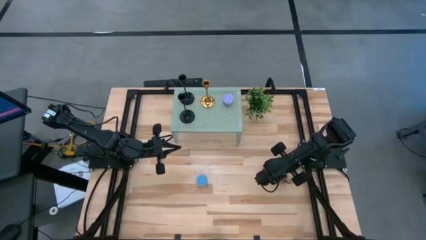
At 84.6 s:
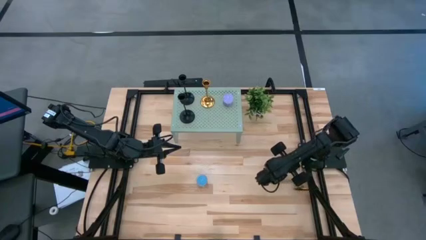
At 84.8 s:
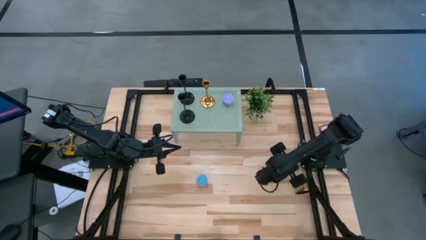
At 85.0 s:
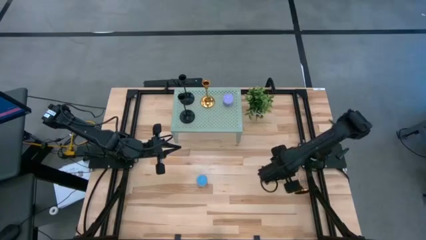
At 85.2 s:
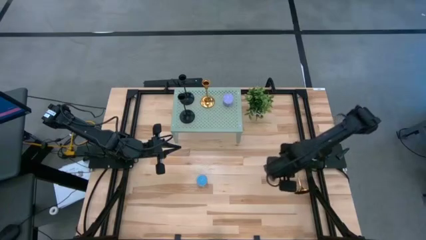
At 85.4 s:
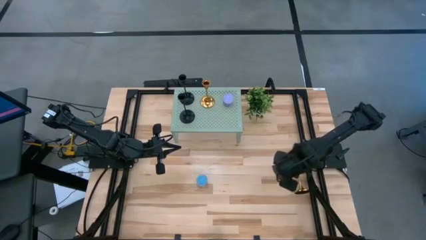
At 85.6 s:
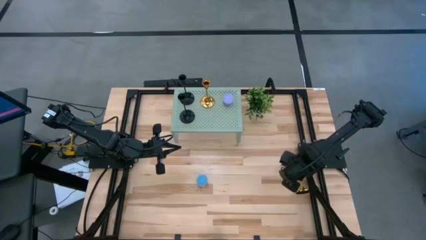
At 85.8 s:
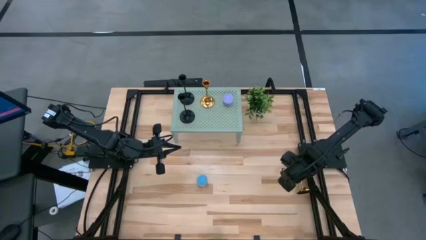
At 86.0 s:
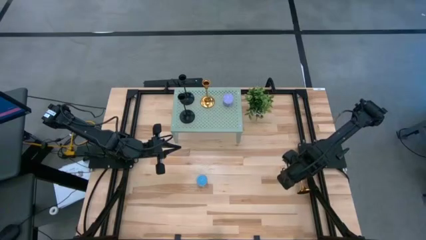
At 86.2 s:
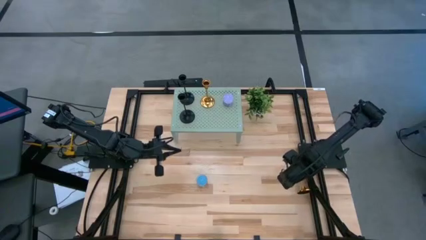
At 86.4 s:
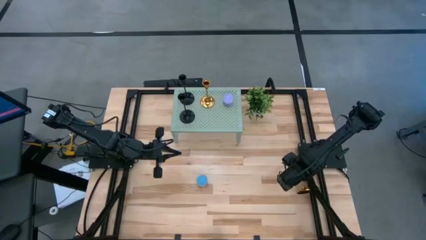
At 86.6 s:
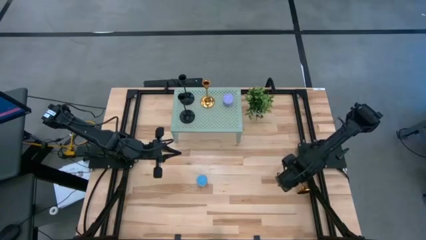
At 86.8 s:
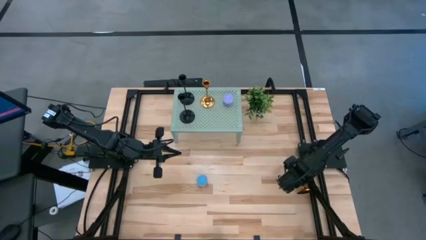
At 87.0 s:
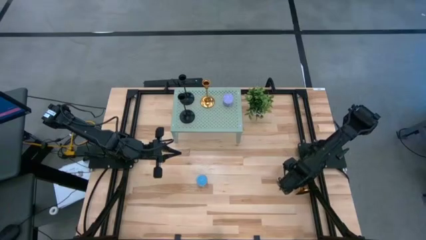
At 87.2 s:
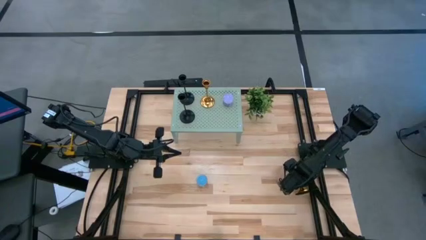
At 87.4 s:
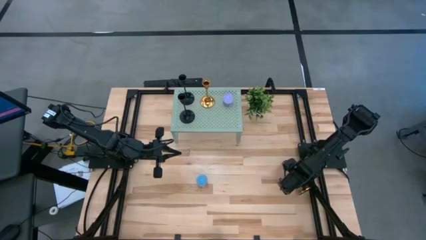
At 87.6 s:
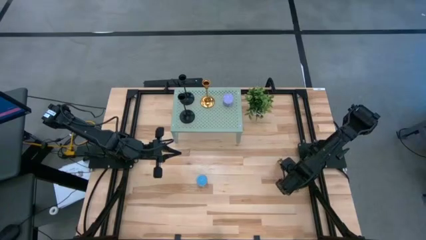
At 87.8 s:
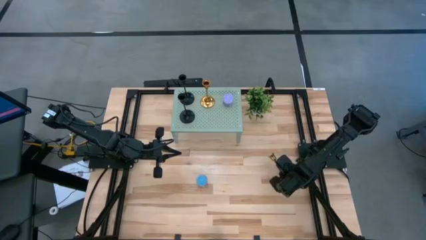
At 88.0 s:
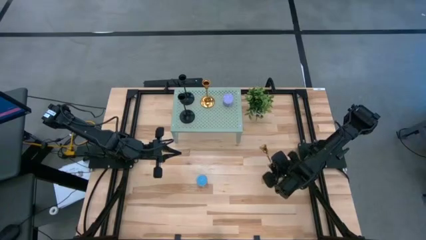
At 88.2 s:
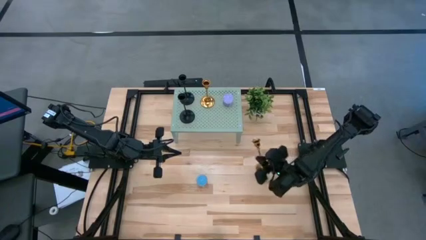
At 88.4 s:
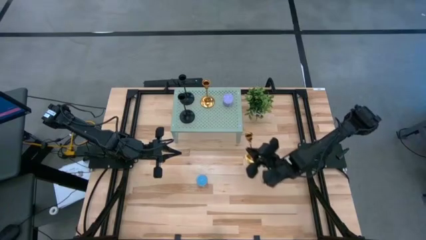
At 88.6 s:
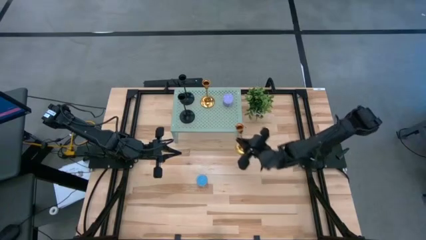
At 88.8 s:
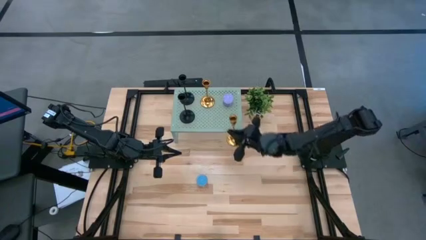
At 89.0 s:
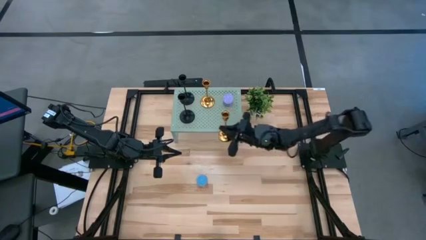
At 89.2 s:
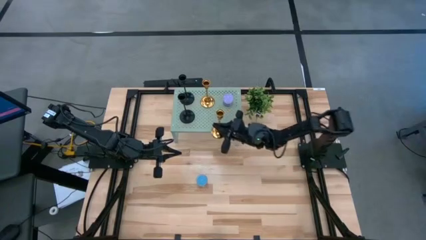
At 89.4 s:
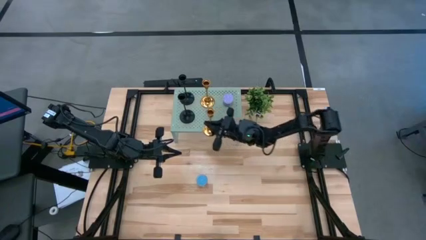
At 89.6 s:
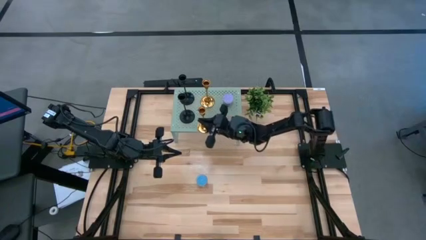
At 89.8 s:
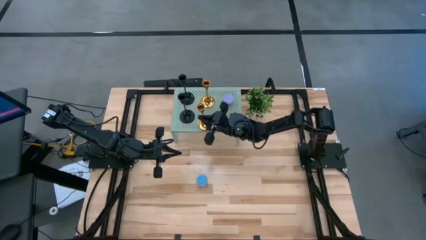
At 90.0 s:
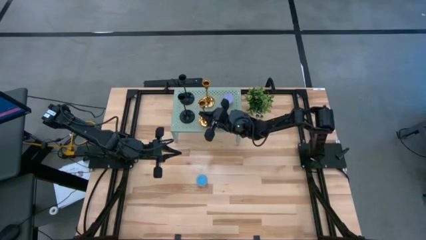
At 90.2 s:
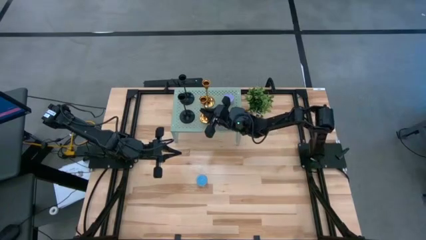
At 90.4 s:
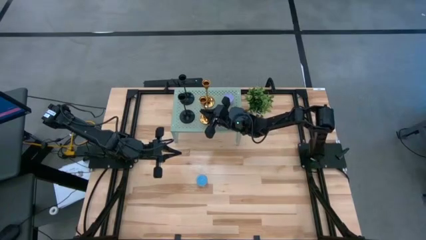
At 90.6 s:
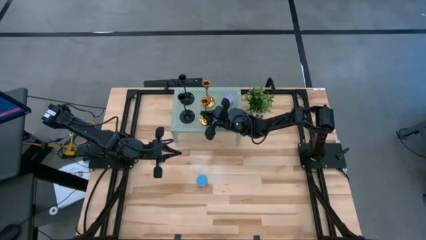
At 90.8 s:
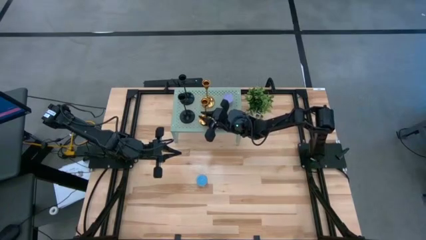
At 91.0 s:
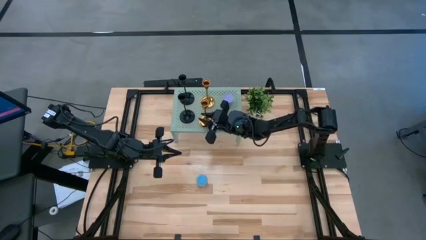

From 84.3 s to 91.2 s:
Task: Pick & Place candle stick holders
Put the gold candle holder on the shelf

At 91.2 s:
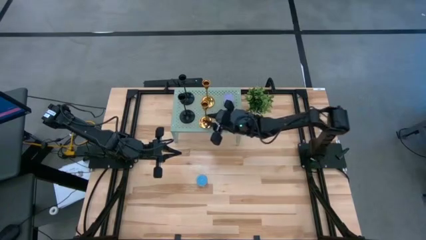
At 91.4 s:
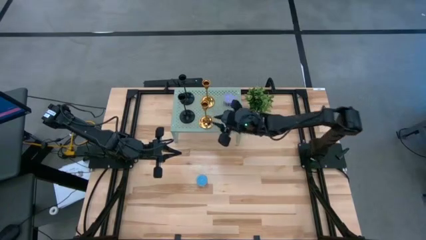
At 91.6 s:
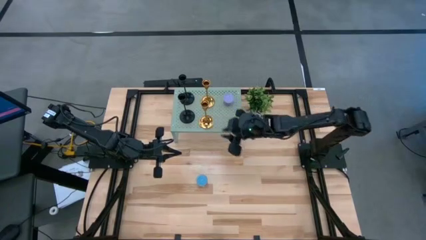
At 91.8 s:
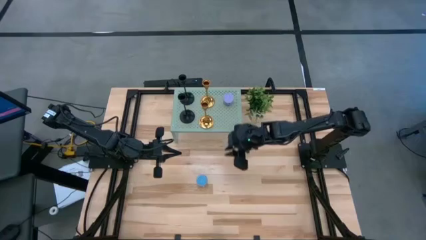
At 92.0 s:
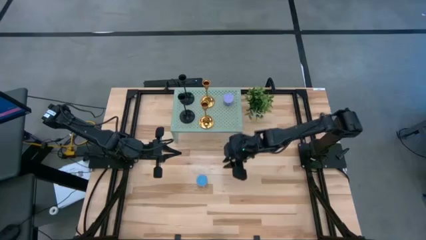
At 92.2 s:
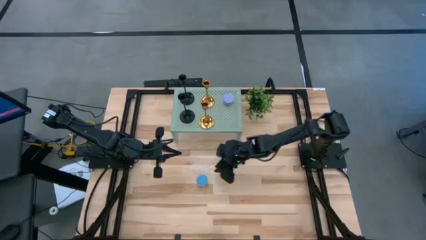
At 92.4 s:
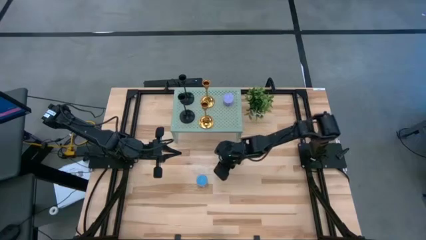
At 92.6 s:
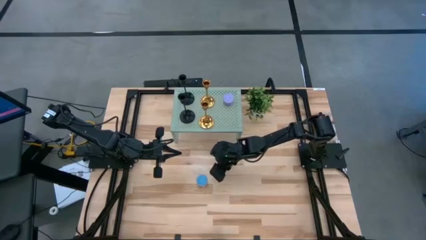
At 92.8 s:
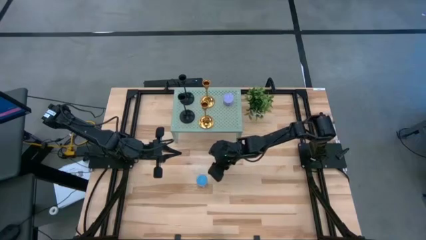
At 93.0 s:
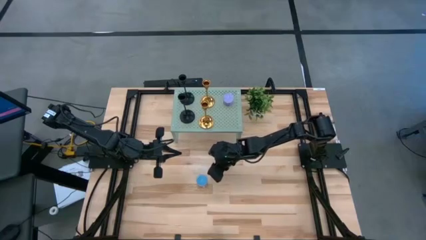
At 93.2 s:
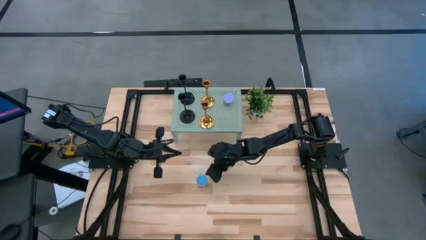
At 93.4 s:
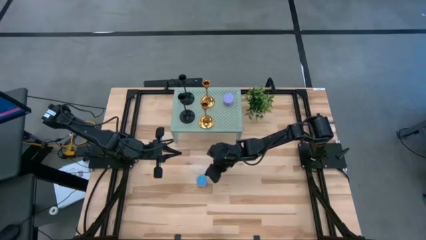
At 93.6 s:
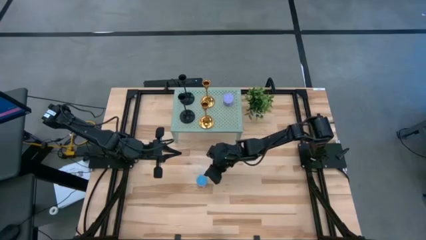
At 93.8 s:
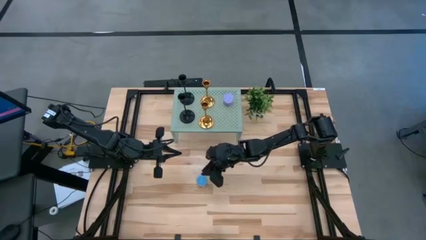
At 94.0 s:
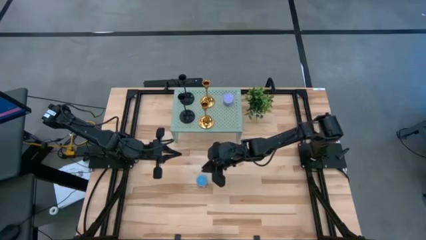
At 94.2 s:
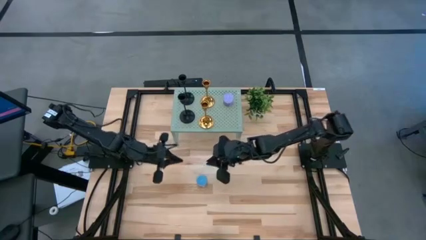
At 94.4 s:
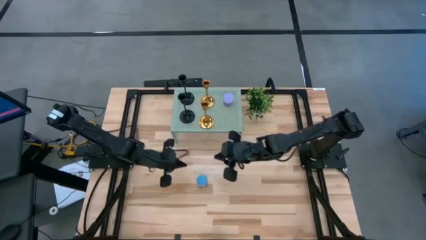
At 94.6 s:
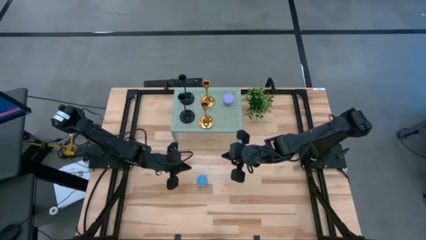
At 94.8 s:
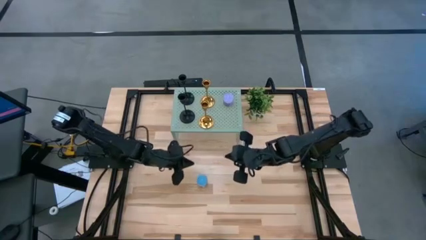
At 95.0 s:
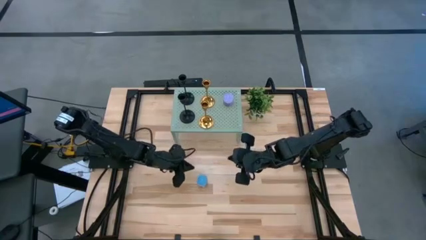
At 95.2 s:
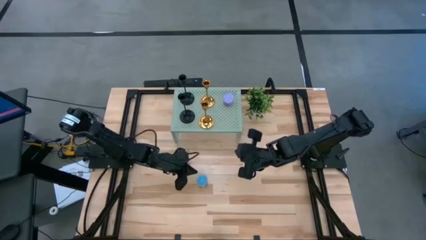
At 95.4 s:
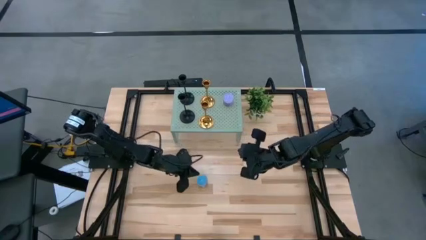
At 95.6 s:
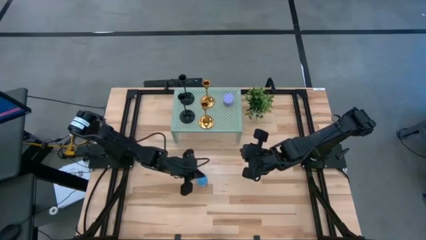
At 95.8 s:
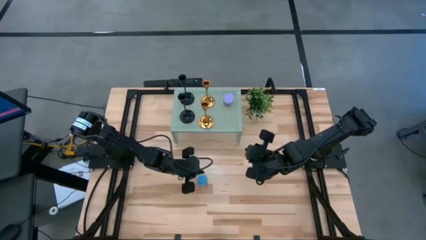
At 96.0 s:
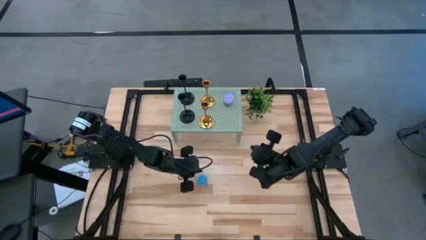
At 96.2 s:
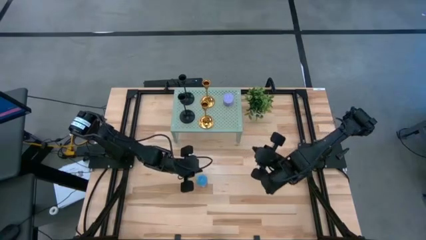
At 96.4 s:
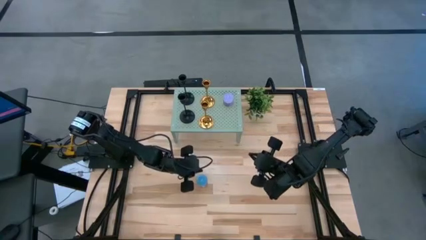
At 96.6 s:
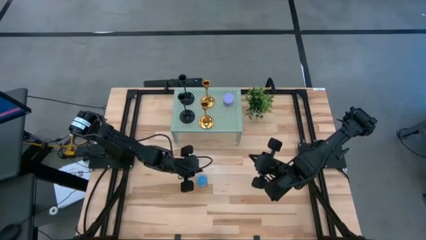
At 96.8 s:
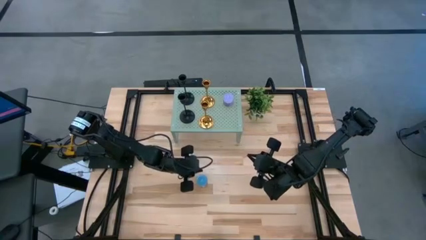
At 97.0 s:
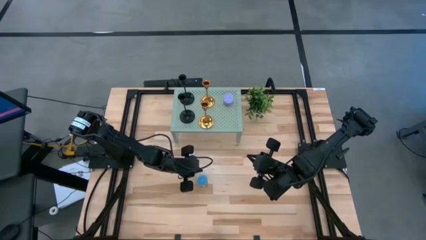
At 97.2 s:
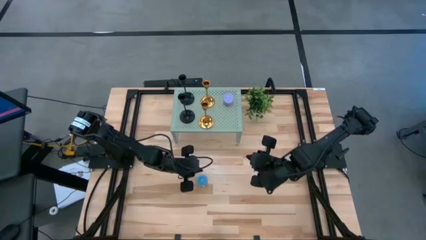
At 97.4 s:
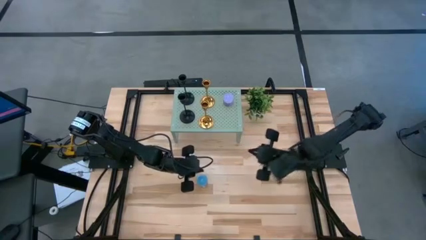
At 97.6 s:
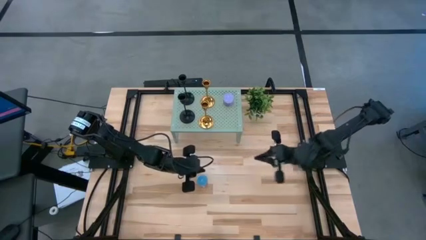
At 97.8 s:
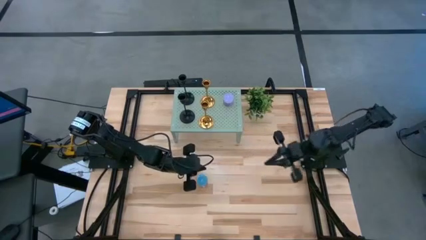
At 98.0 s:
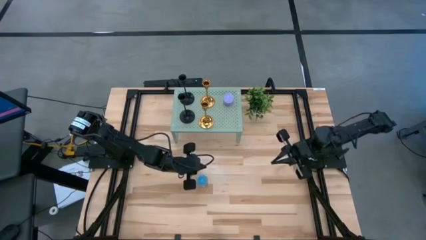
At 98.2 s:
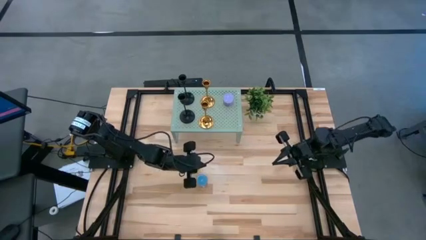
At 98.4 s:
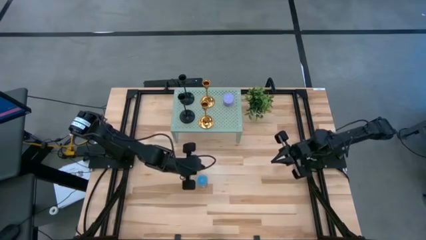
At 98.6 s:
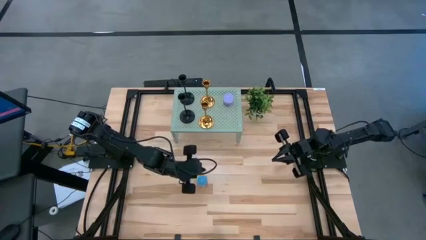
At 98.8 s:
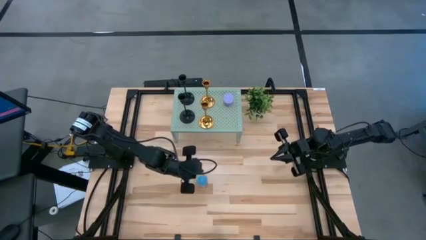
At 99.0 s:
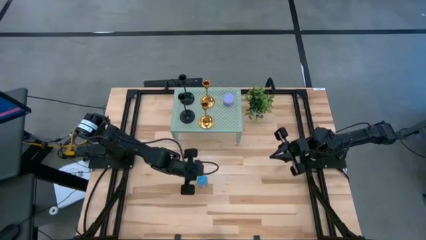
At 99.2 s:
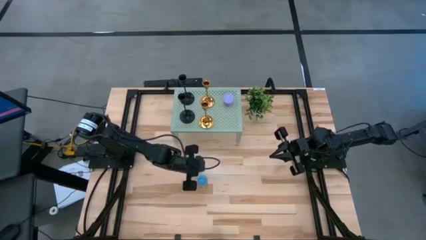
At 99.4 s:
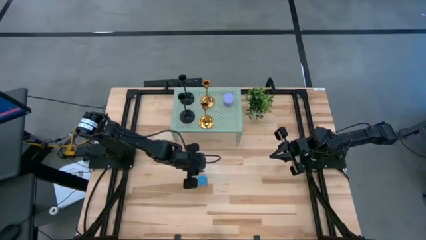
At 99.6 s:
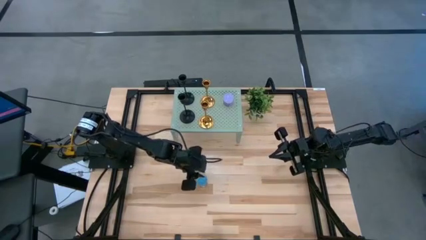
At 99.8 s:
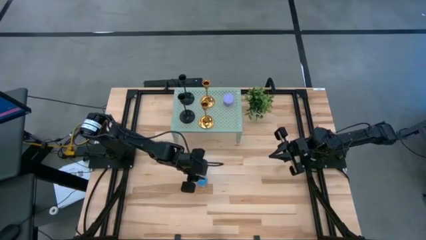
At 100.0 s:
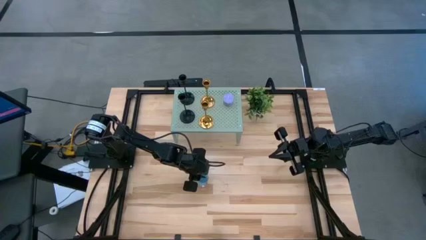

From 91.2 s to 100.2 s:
Put the blue scented candle on the shelf
